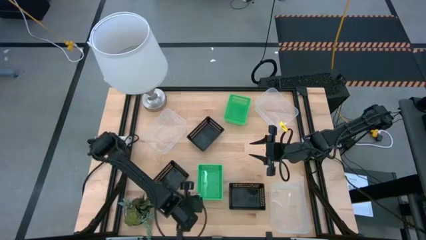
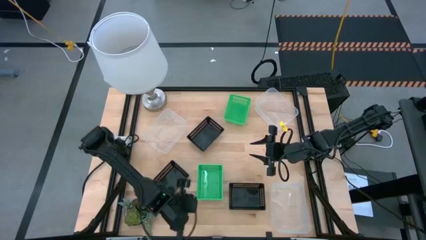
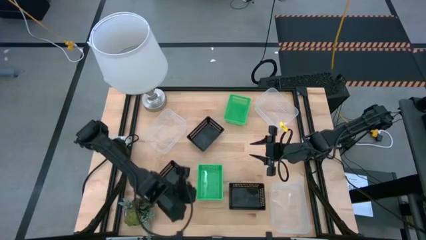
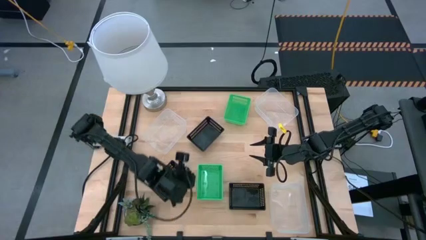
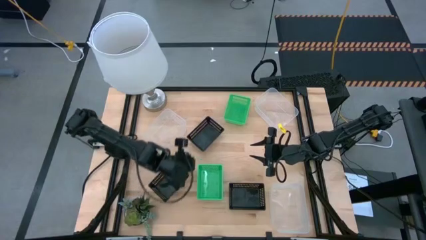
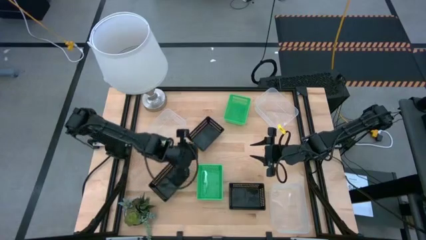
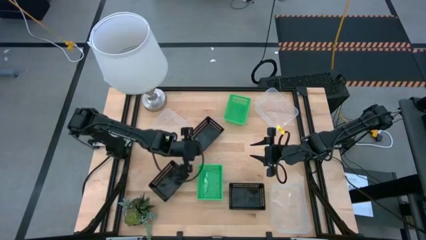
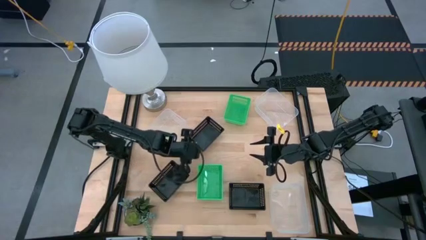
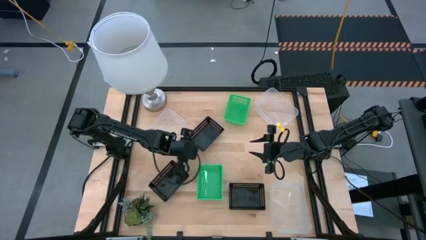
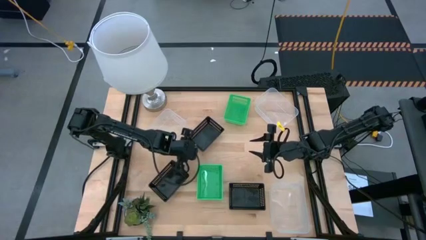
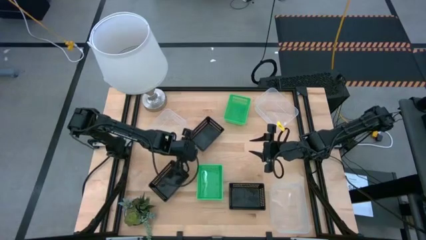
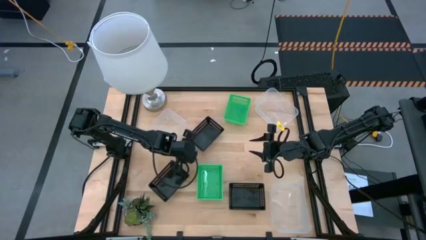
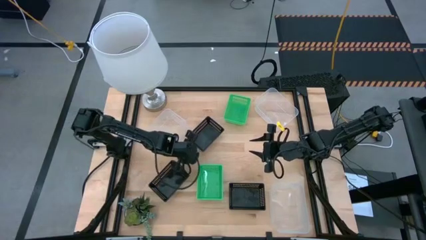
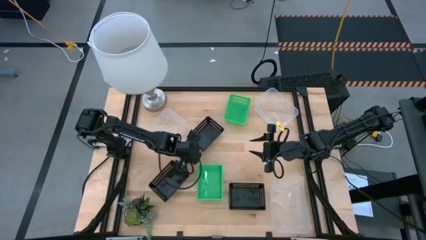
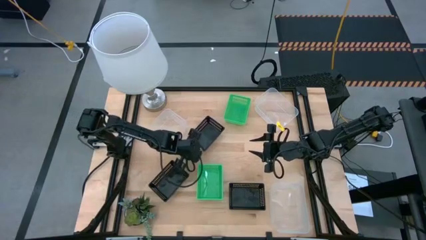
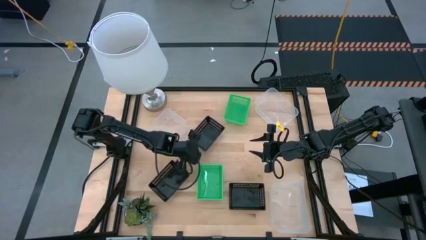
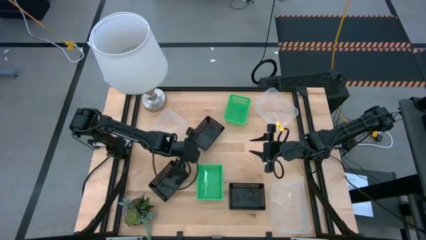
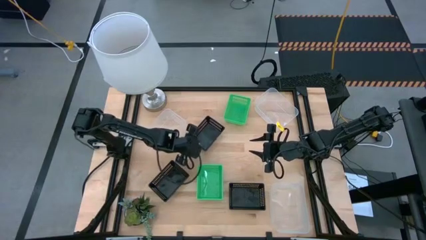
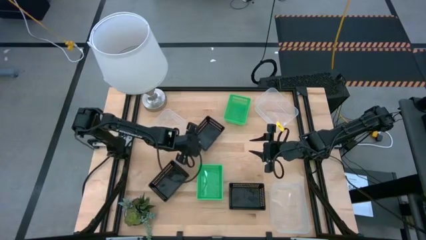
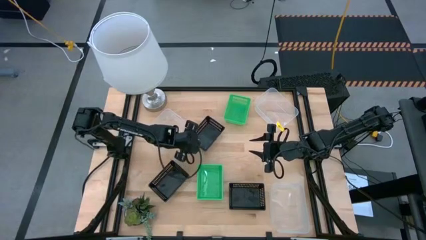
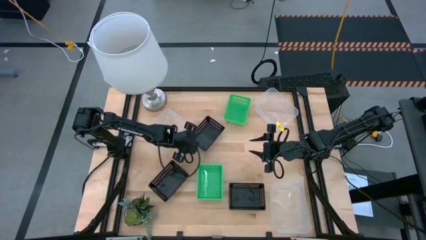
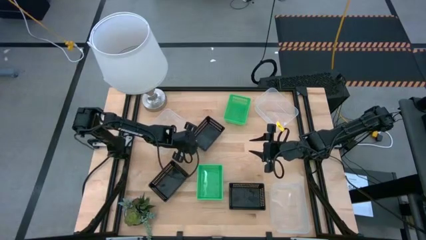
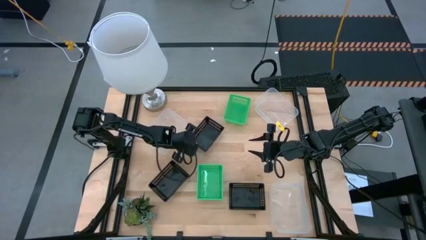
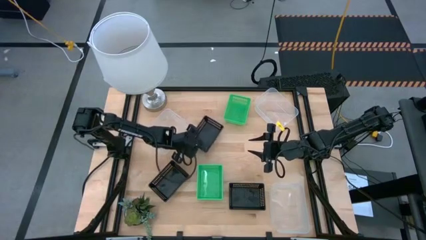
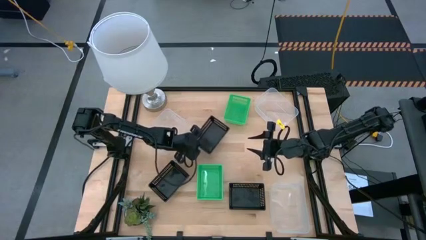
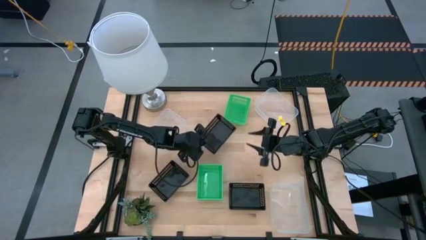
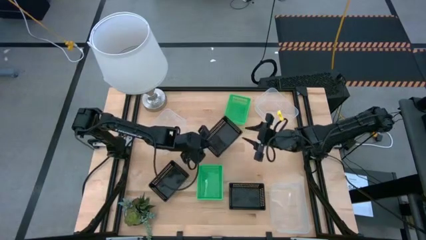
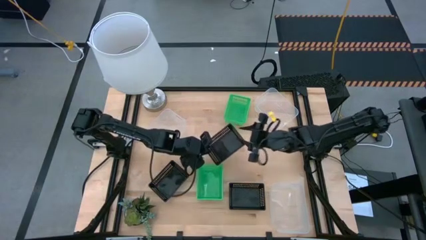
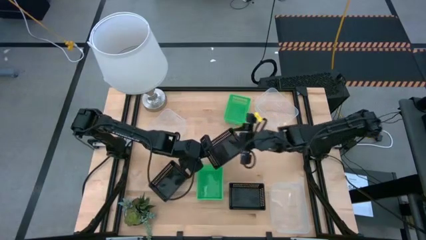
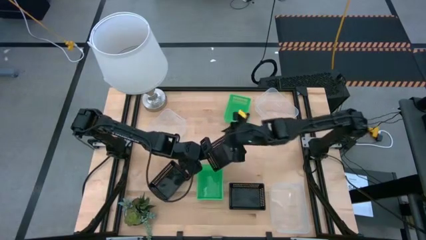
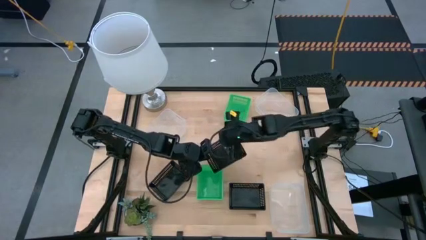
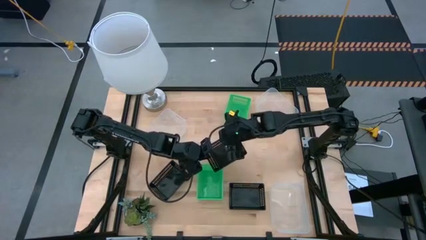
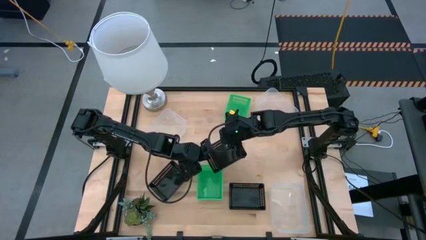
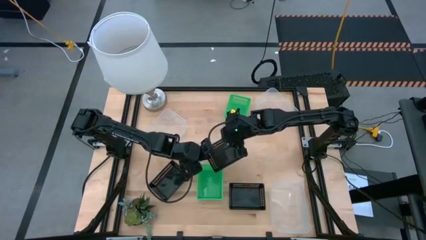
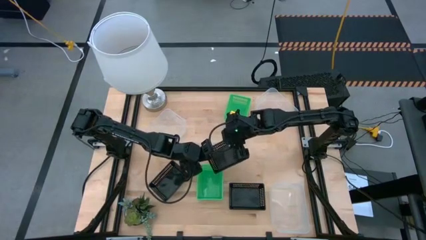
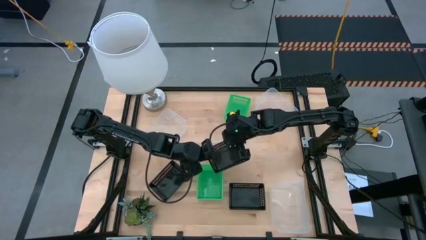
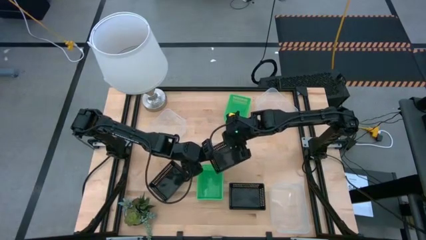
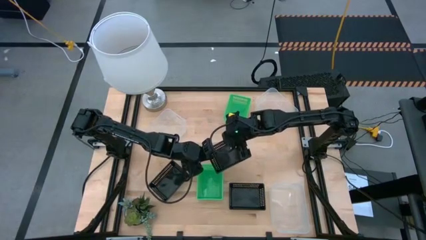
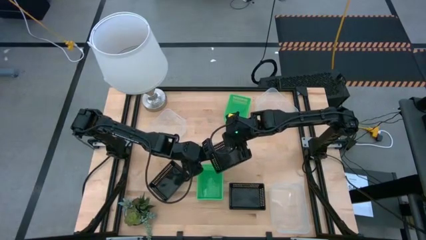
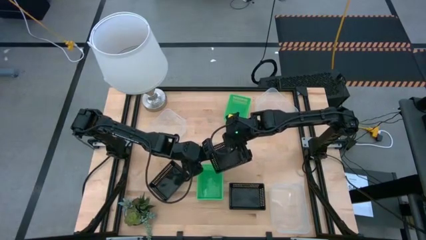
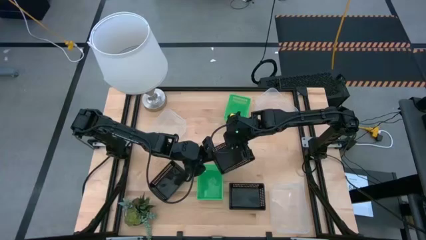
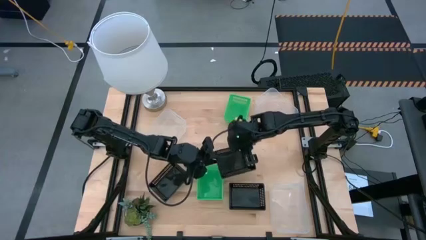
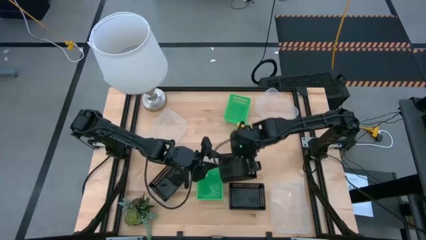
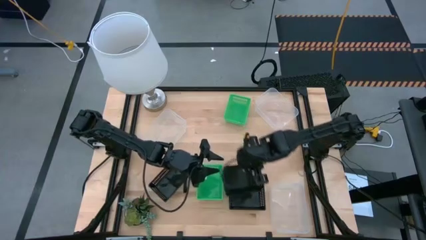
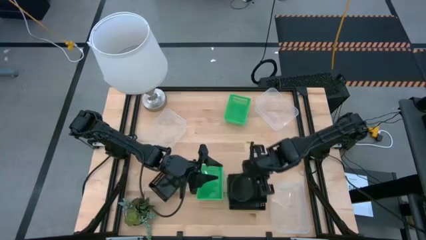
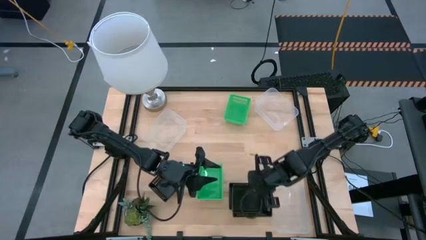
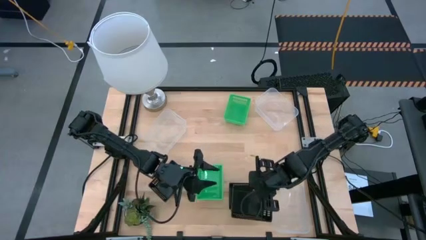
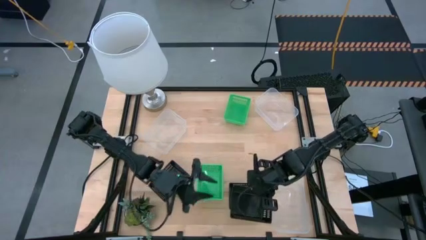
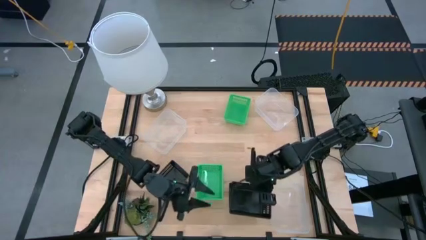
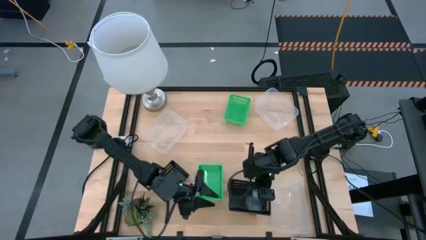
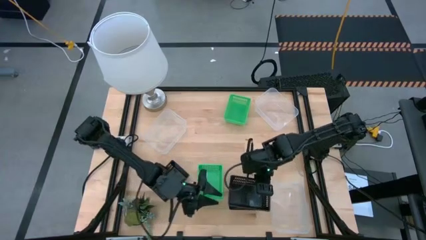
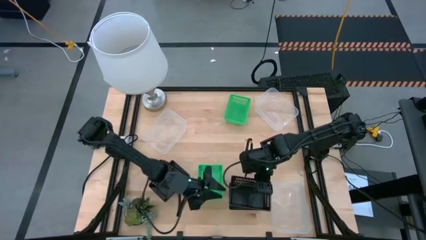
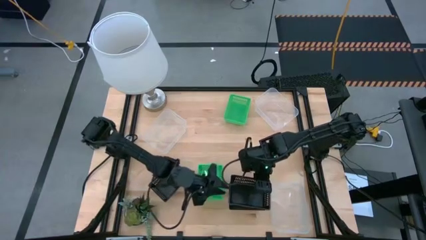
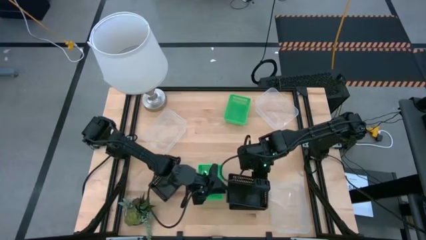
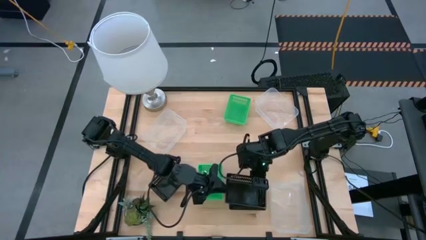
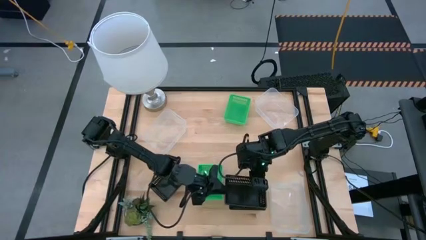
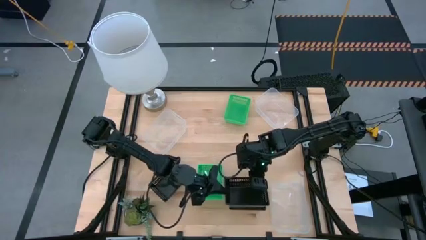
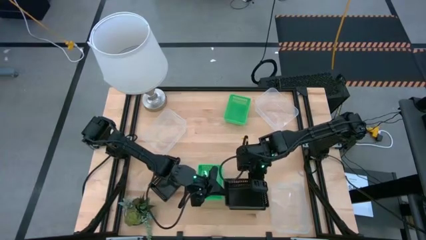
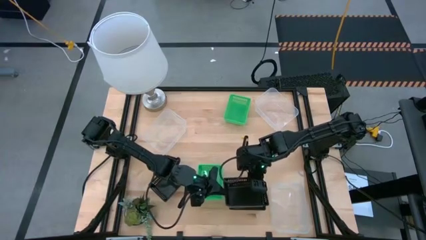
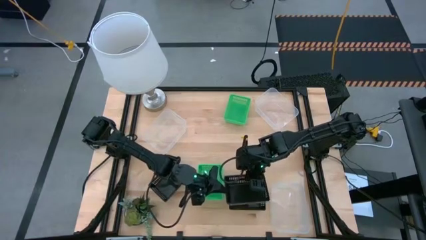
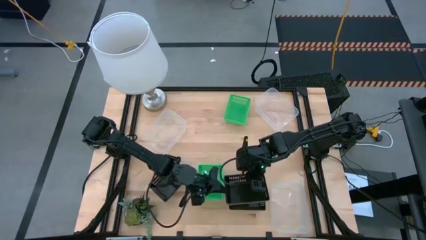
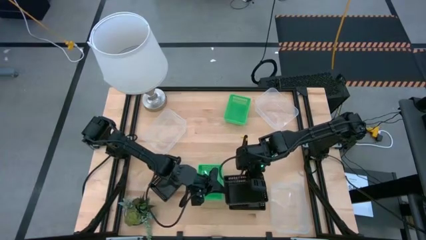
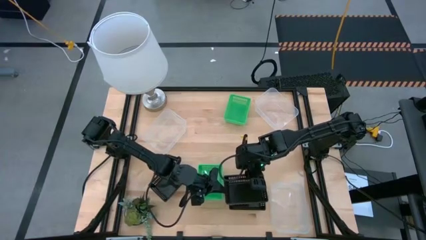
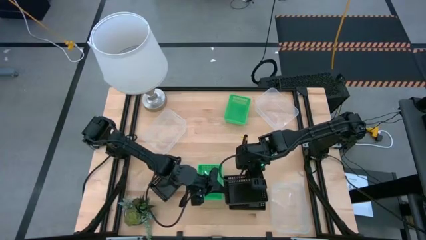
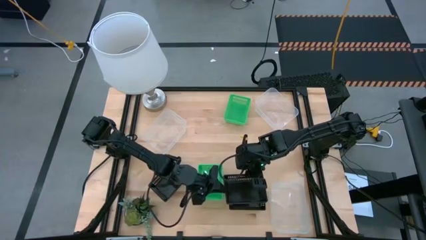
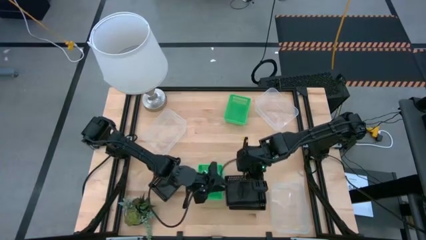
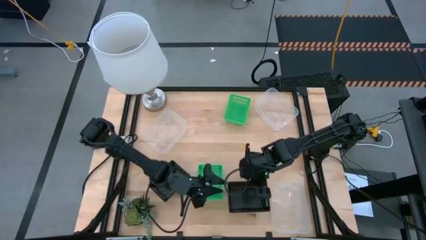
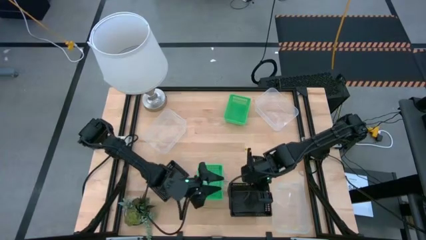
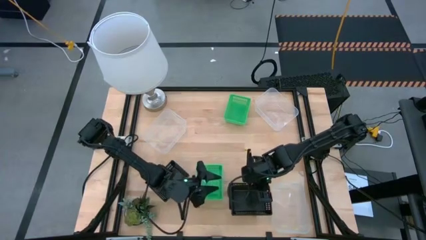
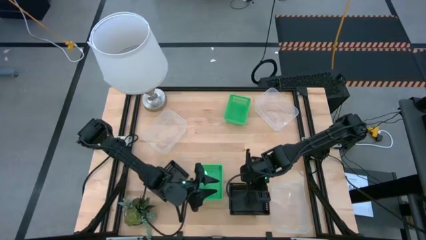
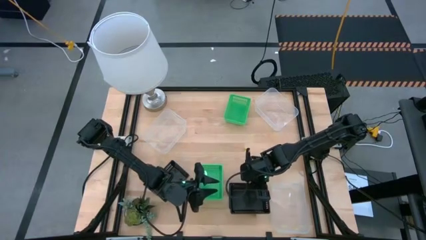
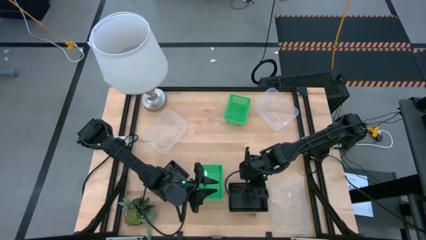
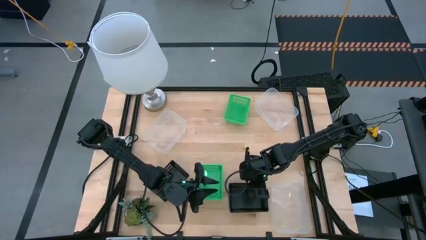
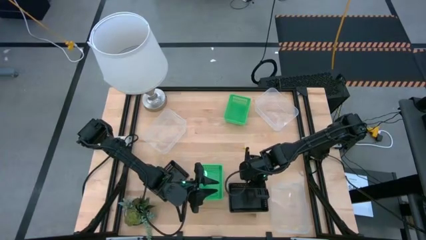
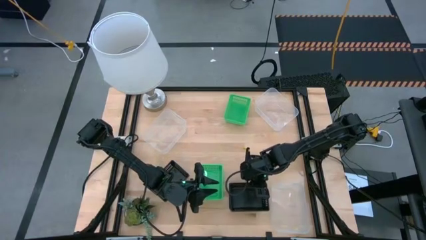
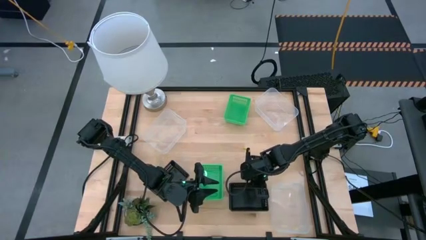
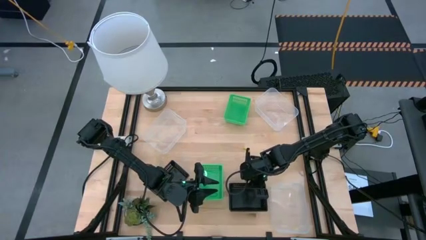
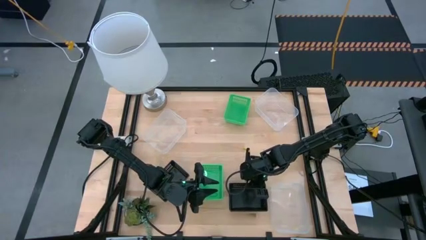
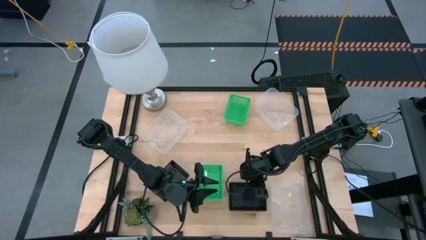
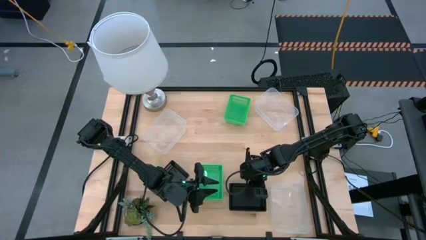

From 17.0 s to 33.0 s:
Stack the top middle black bin on top of the bottom right black bin
